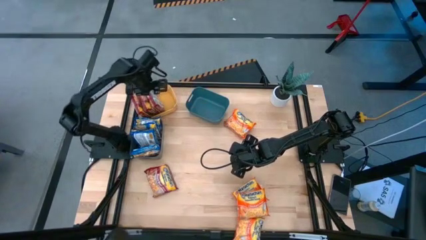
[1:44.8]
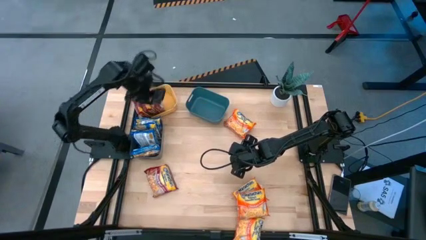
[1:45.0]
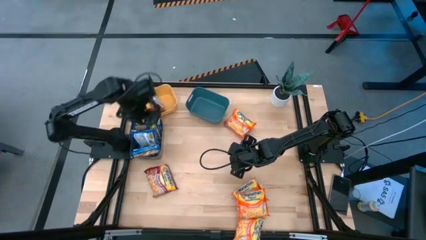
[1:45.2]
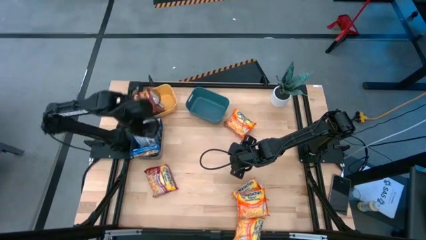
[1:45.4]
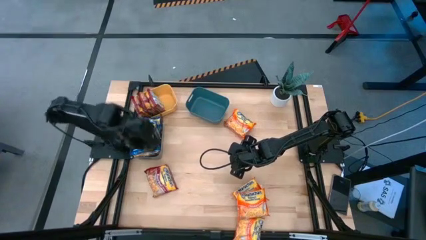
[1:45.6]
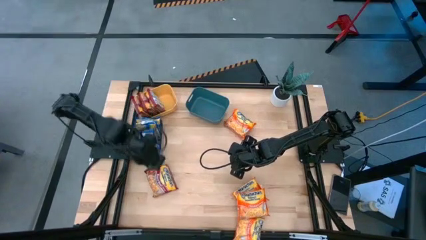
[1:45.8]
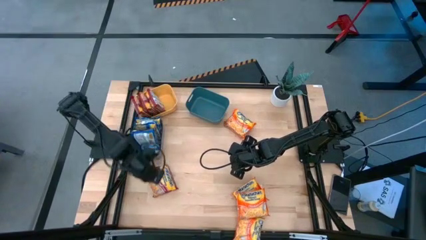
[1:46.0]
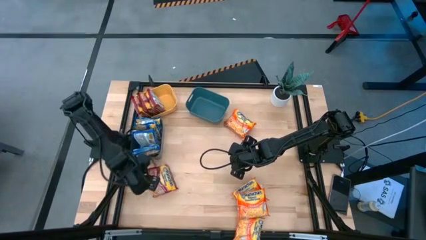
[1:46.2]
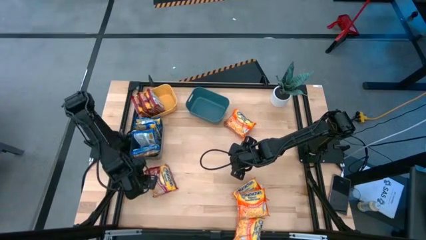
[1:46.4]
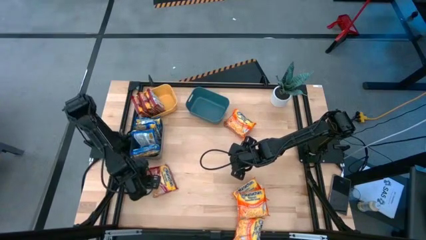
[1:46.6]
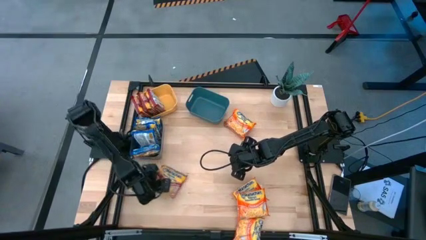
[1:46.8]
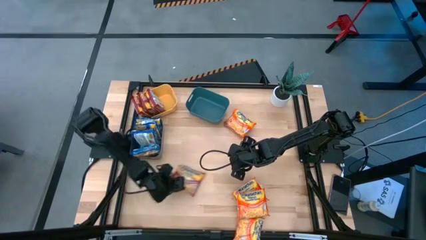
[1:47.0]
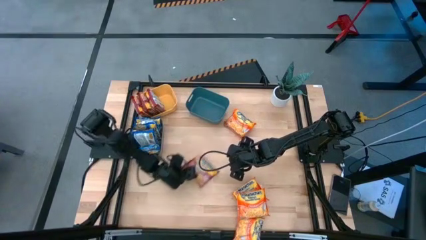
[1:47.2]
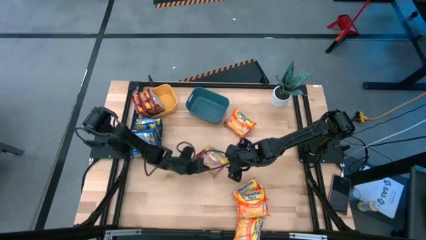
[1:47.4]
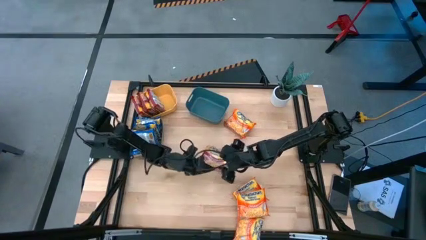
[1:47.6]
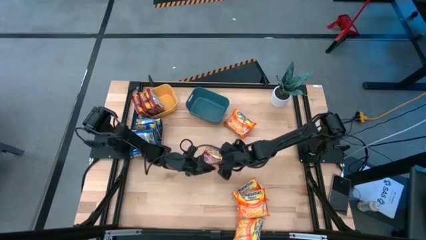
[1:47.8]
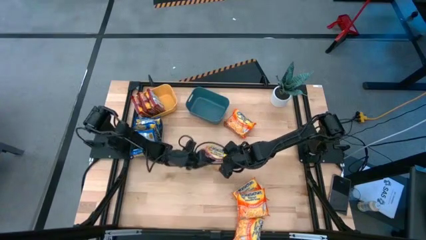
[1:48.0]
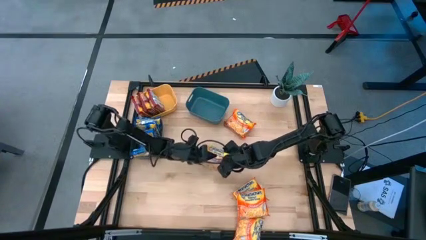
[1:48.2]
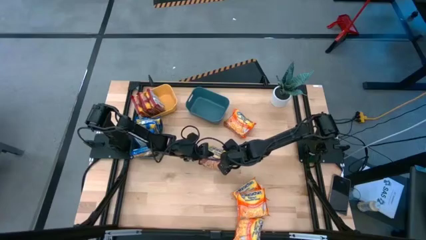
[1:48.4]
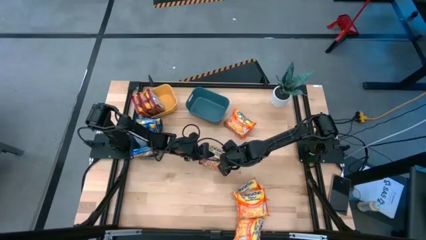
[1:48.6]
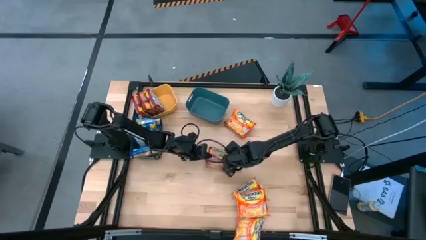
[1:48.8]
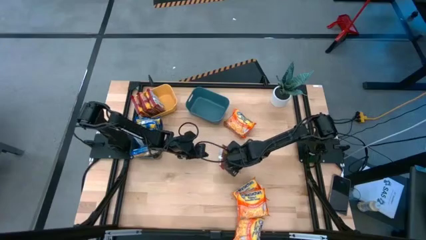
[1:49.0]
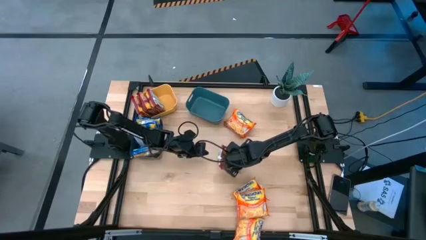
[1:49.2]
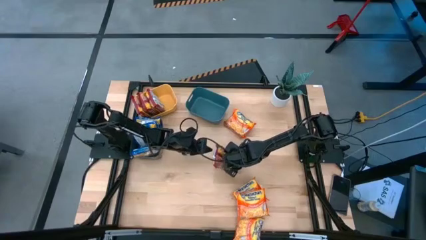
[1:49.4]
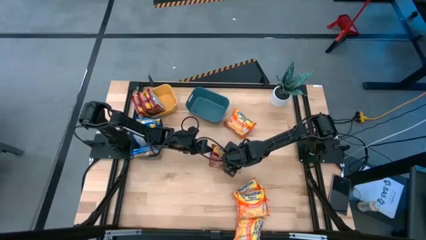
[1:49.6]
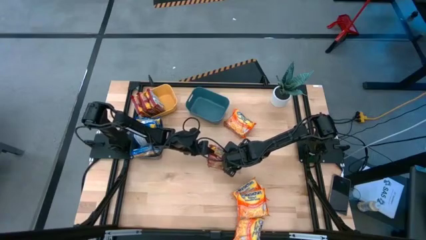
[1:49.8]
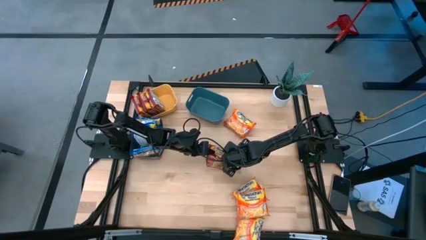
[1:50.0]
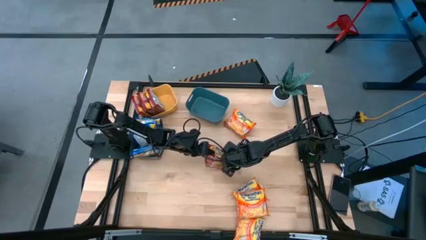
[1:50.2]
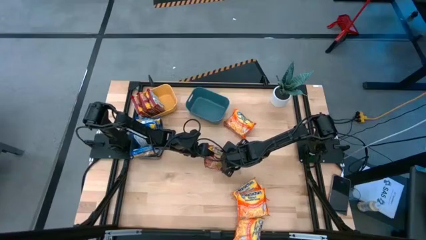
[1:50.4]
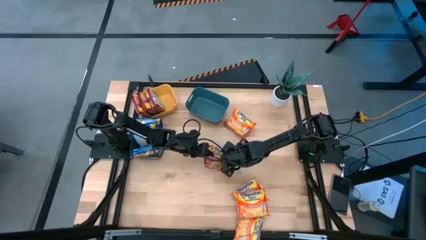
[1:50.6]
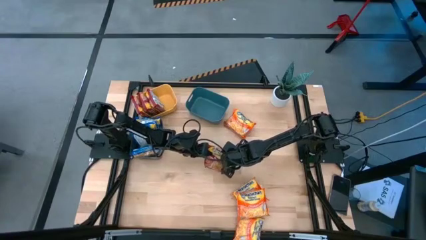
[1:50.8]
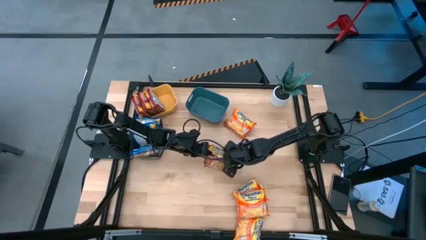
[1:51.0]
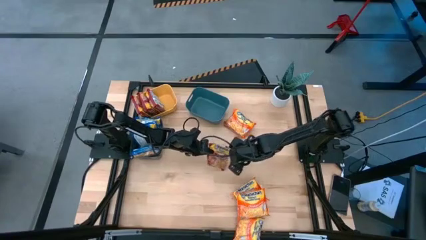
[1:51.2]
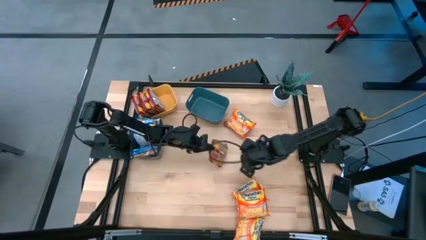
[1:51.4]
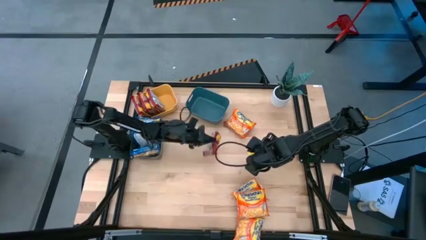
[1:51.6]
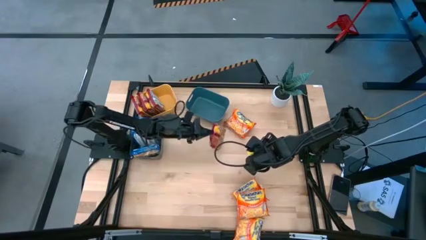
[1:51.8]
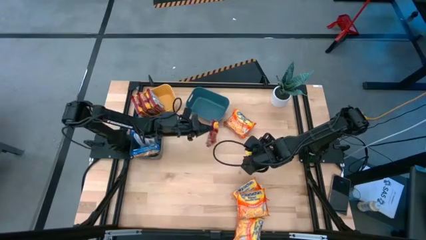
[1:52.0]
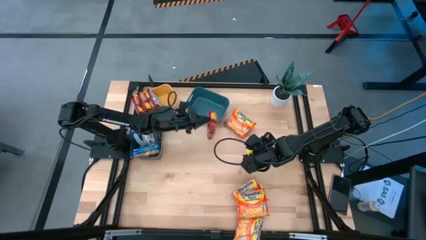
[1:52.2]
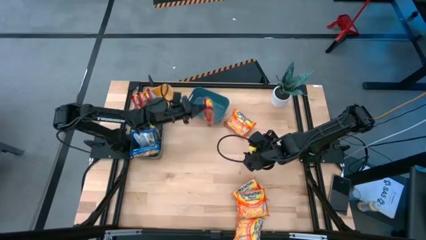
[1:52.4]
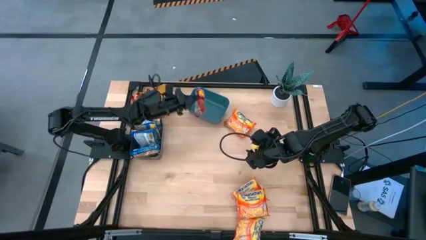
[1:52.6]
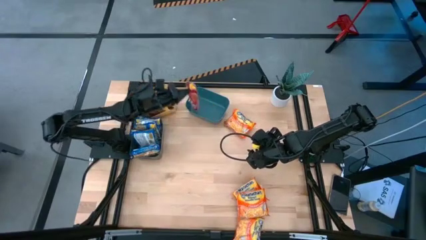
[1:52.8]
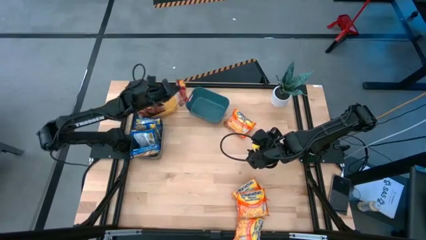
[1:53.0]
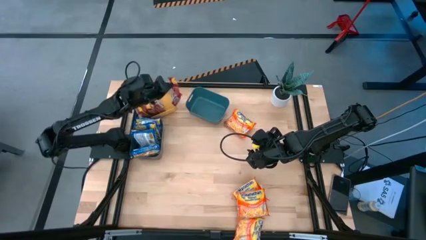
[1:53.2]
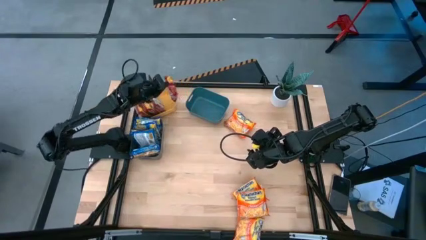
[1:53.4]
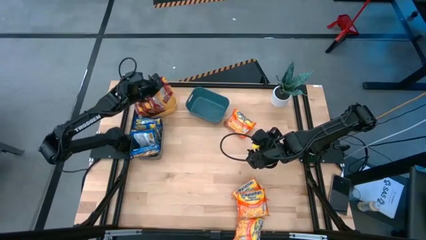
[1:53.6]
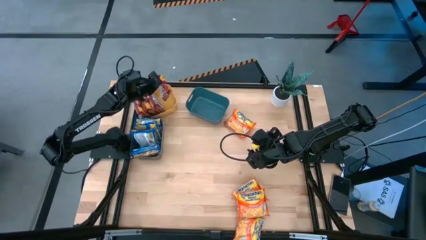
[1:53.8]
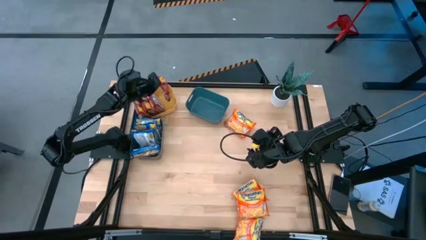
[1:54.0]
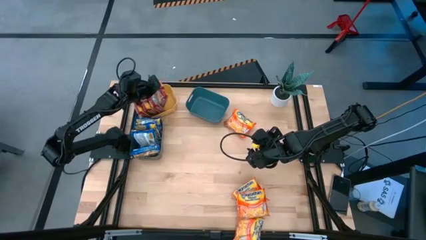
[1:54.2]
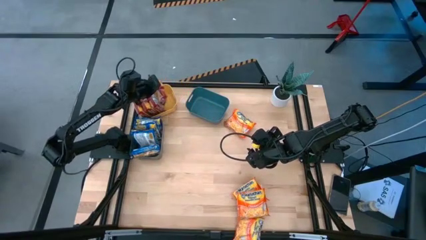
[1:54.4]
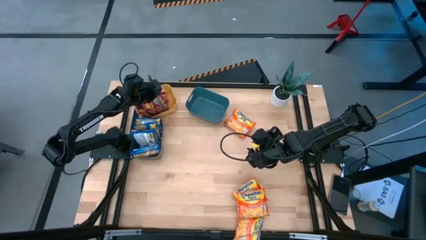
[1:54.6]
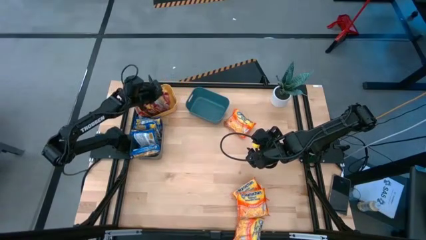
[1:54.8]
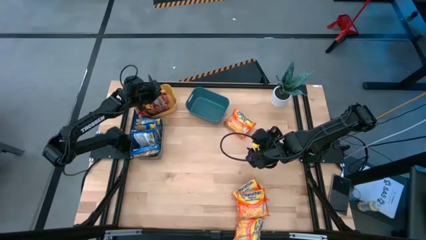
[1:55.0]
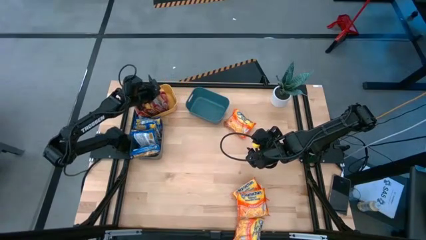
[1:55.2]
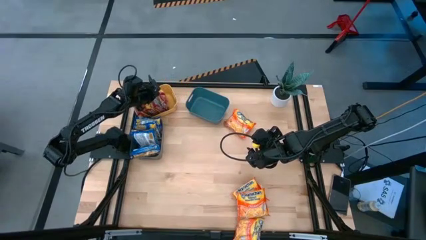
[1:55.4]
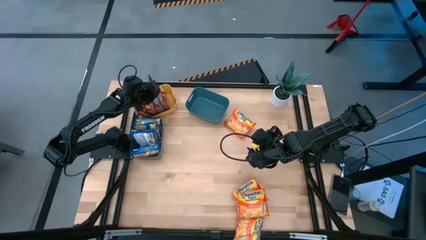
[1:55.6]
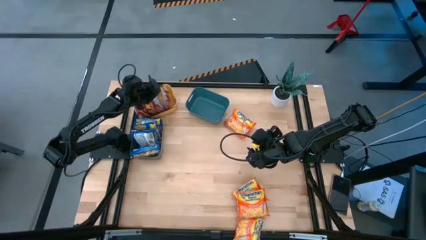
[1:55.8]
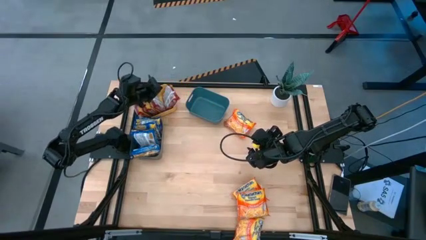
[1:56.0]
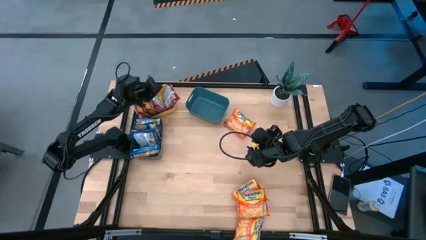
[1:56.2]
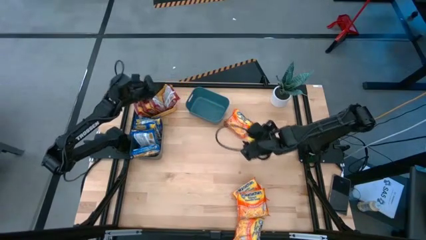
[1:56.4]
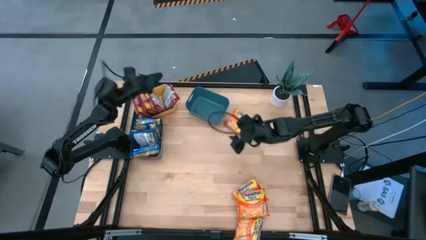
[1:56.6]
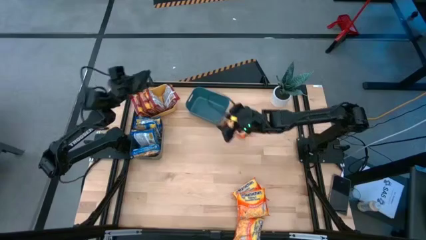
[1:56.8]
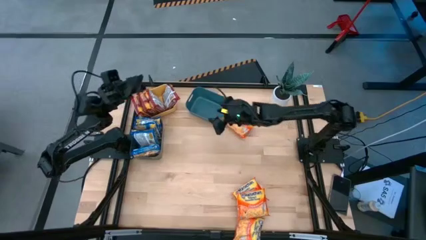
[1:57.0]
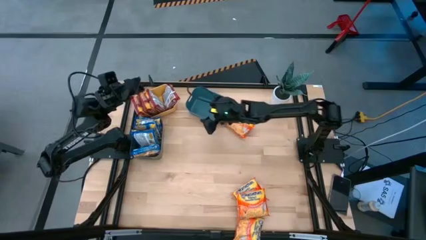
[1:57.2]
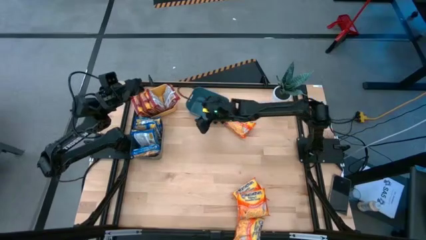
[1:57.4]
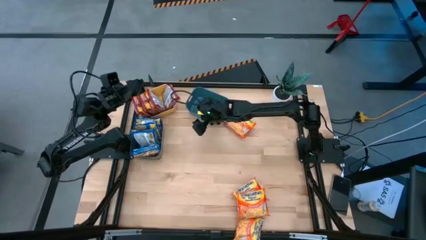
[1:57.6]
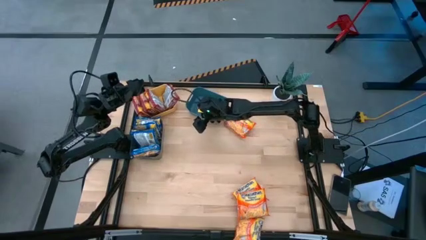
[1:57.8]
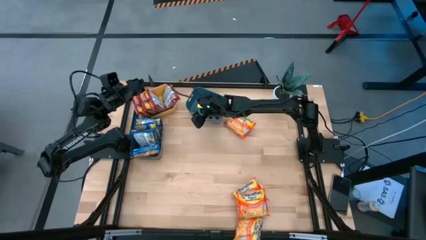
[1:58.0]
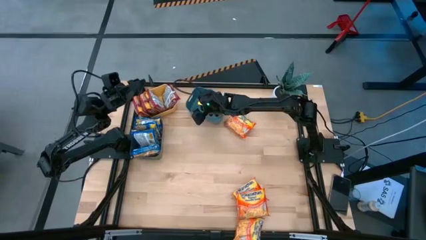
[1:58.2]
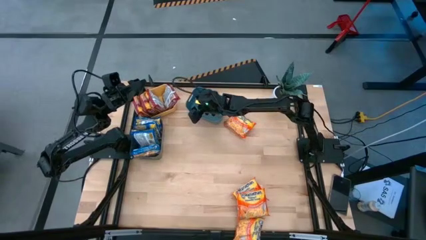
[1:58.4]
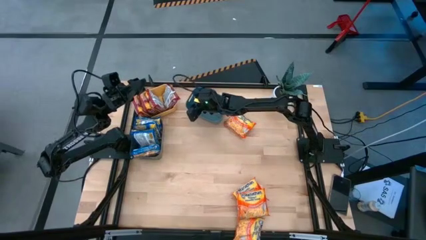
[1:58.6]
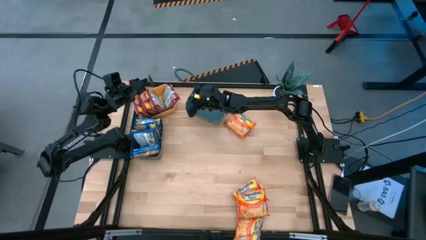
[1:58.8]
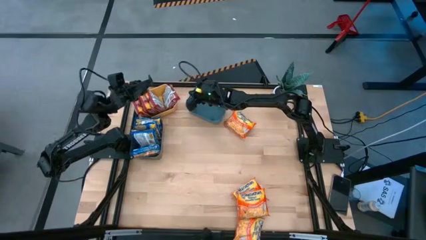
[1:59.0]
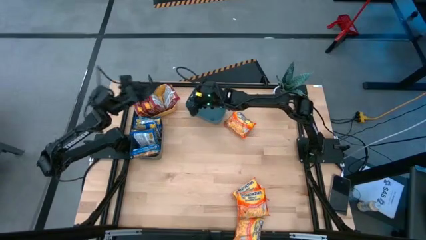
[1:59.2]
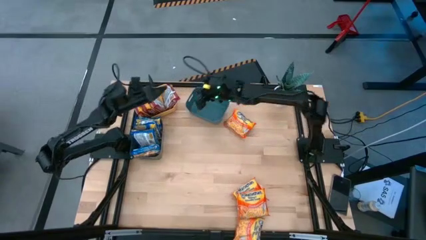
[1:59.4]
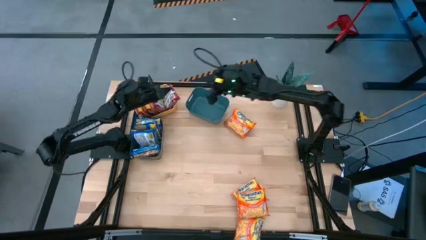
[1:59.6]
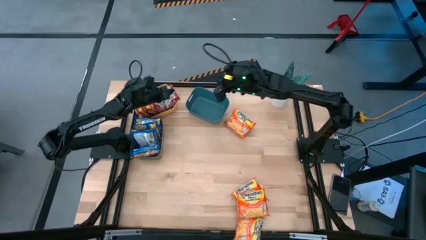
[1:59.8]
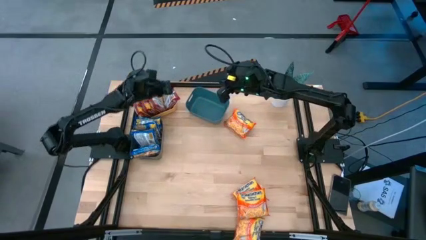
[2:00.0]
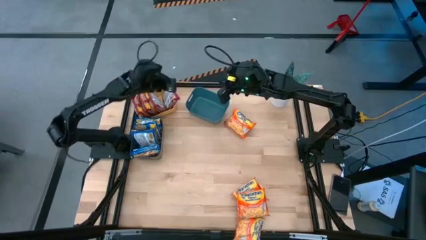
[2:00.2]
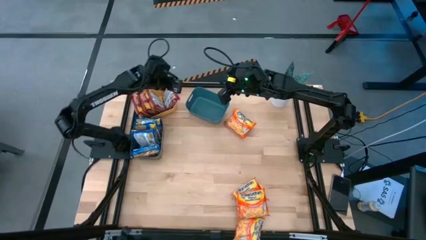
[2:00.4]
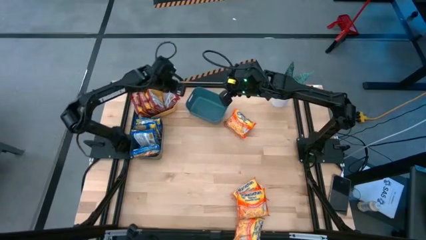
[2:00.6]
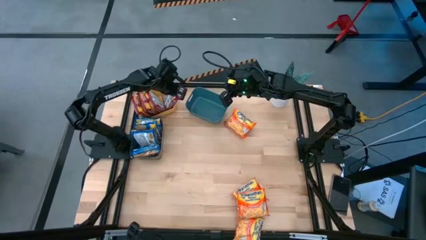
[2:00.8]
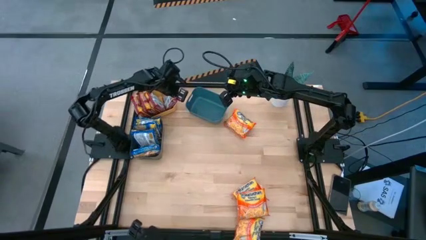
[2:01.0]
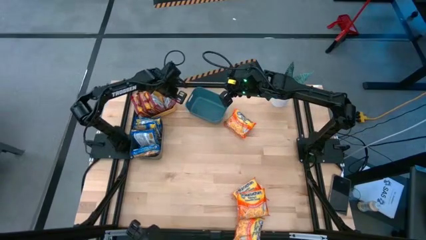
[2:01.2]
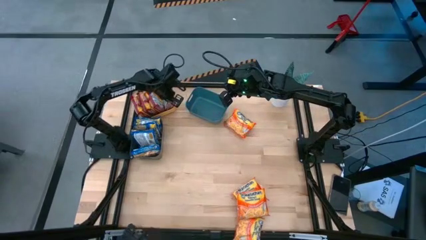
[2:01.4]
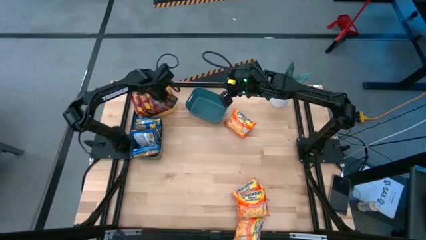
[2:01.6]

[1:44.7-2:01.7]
Task: Sort Maruchan noodles
Put the red noodle pack into the yellow bin
